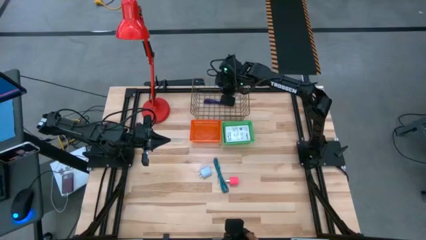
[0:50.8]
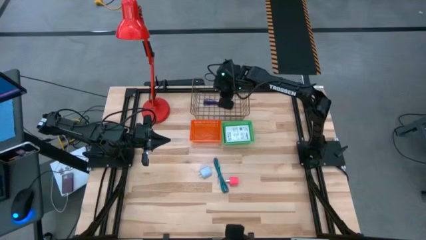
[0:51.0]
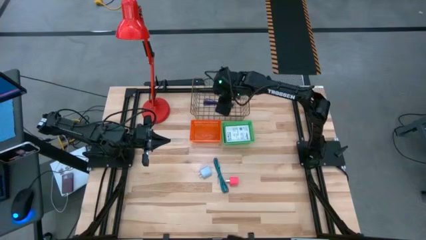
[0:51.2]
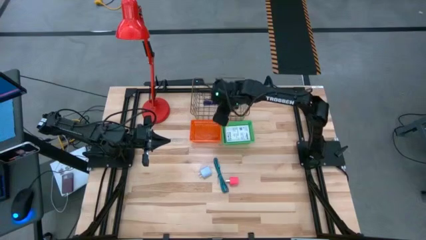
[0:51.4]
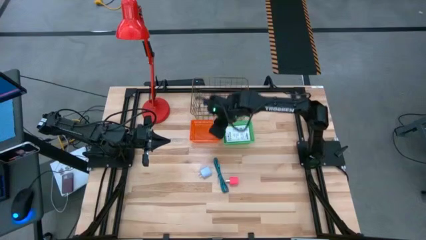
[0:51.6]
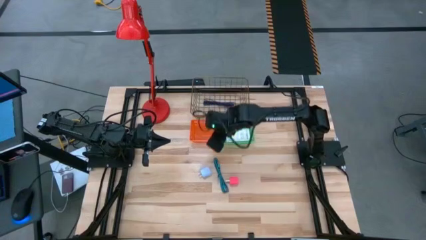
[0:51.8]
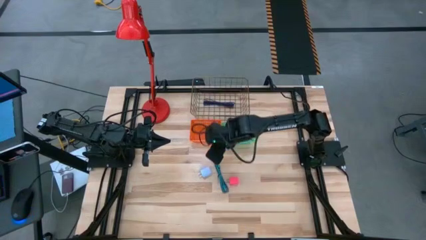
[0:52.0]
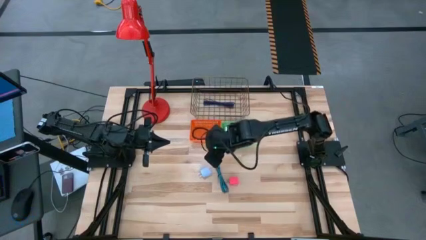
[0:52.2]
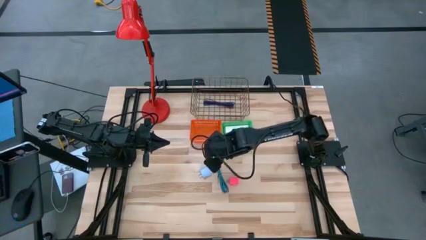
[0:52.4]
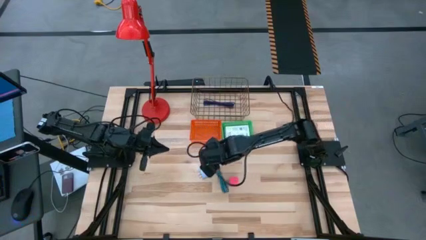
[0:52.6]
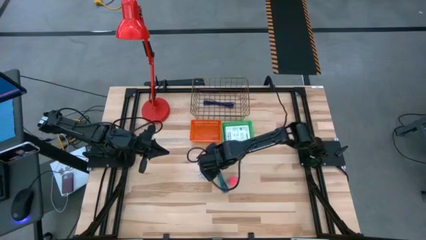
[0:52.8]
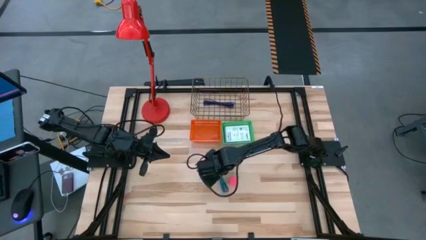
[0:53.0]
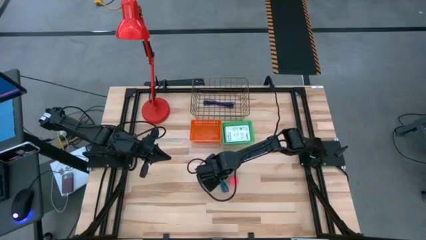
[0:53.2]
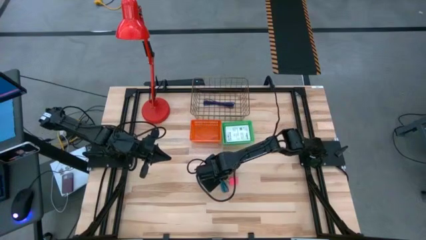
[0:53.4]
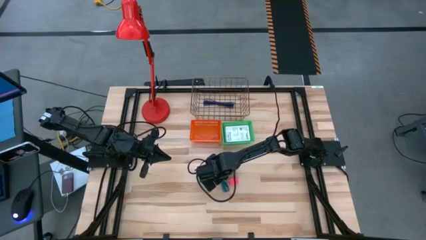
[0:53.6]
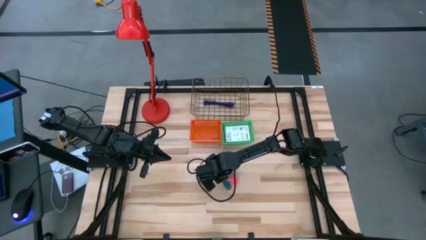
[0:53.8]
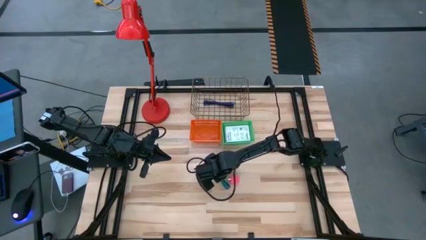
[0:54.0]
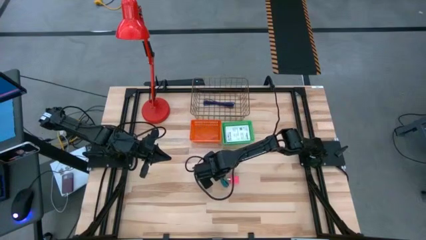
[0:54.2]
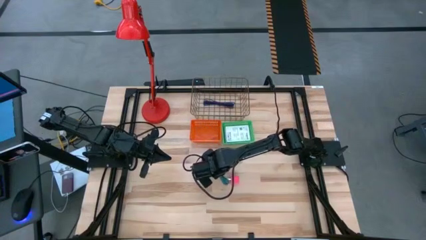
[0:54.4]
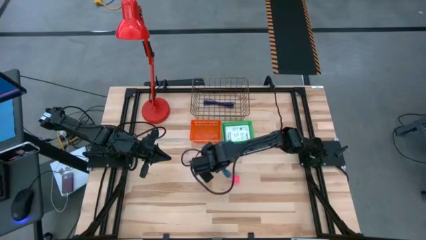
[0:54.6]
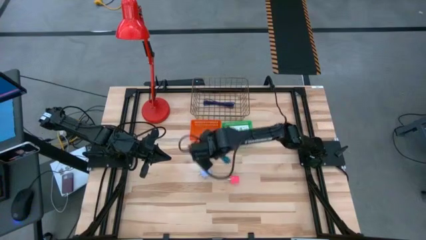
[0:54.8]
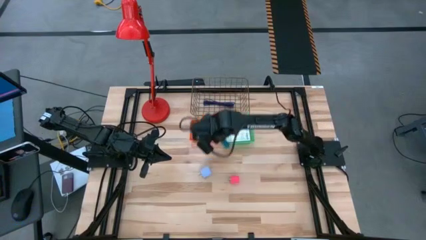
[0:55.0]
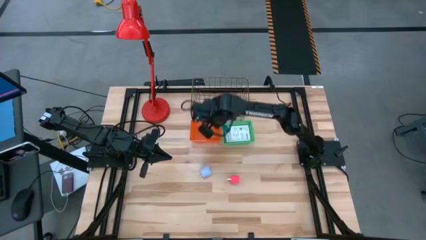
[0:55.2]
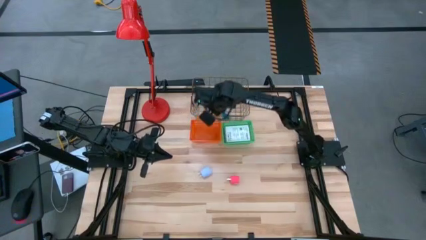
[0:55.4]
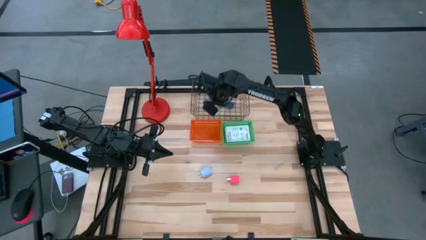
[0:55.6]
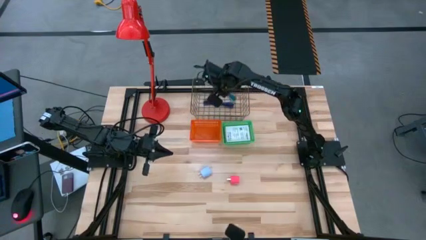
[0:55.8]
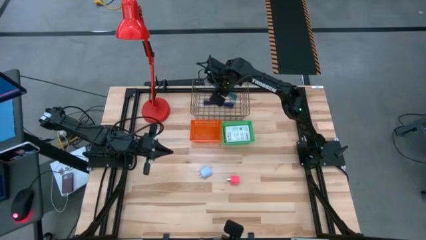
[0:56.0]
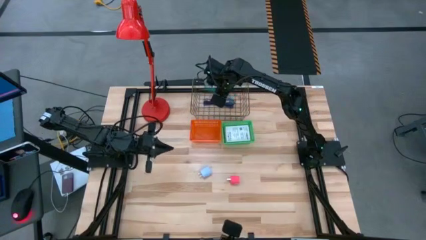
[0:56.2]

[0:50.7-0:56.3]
Task: Pick and place items into bin
Put the blue charger cable into the wire basket

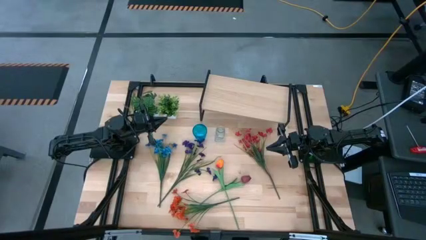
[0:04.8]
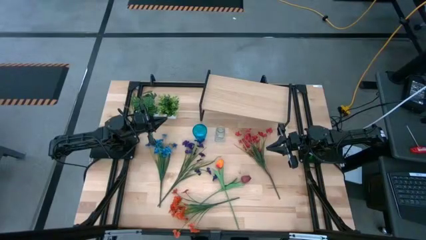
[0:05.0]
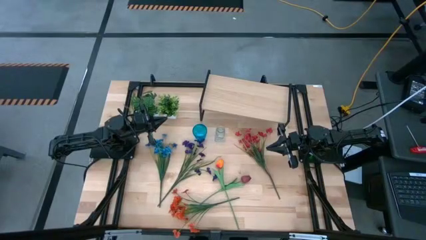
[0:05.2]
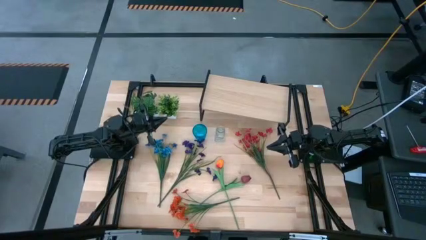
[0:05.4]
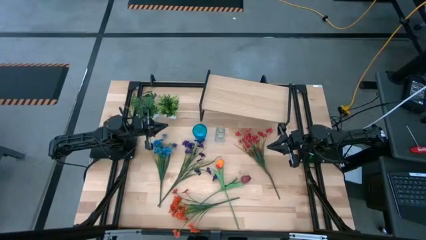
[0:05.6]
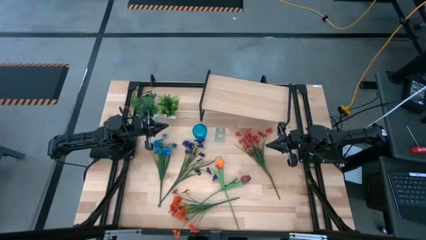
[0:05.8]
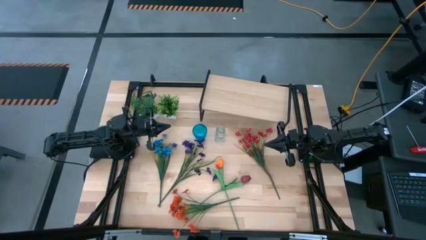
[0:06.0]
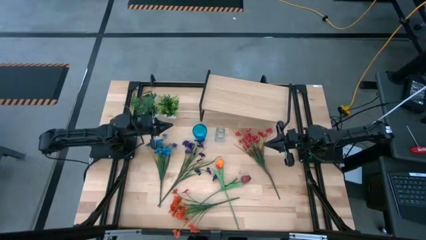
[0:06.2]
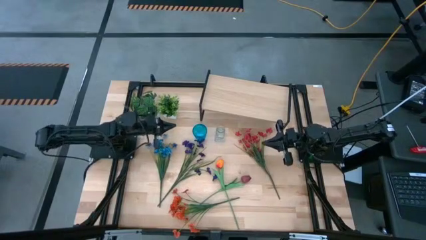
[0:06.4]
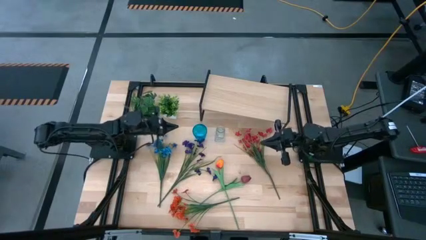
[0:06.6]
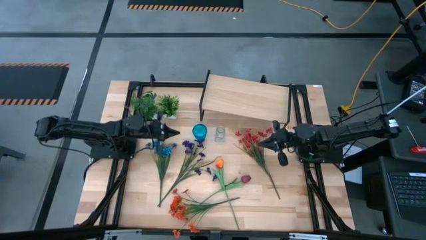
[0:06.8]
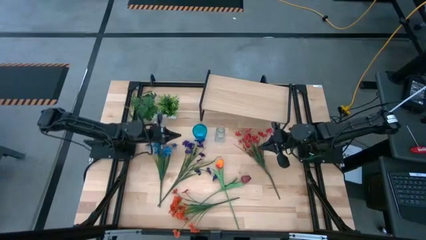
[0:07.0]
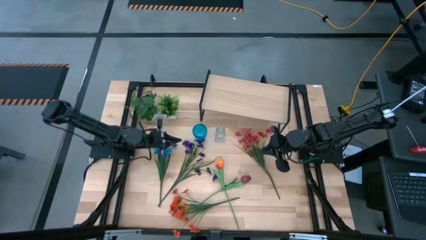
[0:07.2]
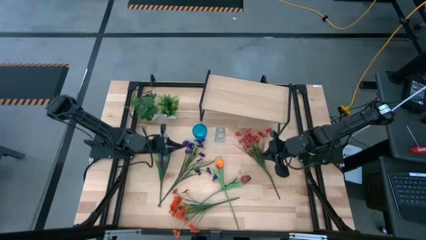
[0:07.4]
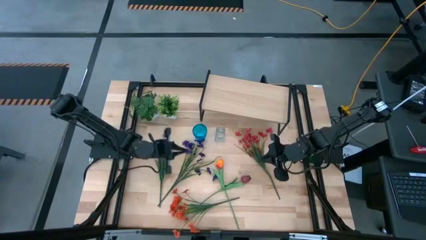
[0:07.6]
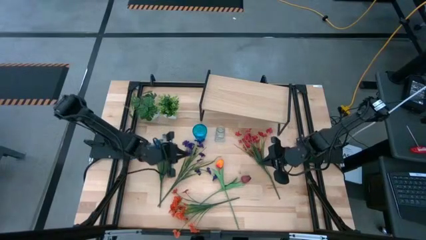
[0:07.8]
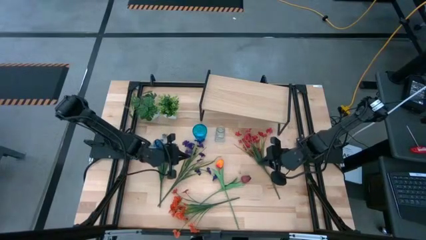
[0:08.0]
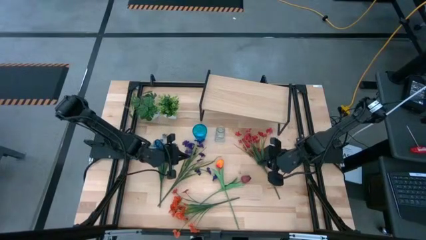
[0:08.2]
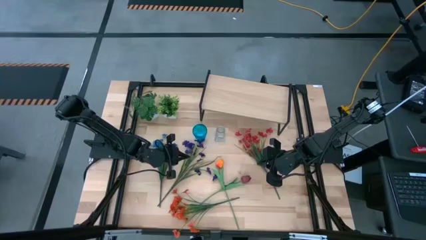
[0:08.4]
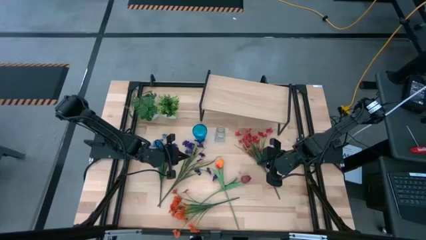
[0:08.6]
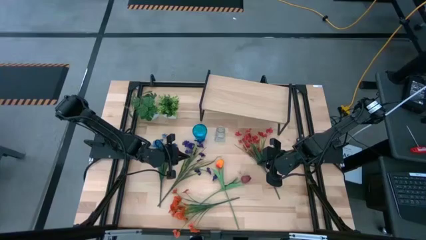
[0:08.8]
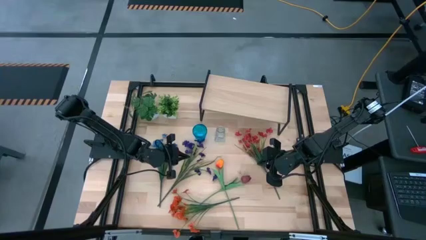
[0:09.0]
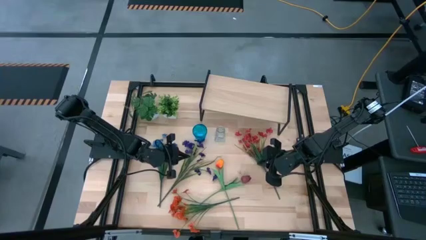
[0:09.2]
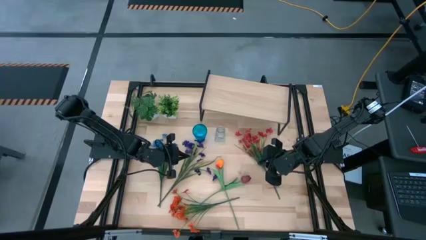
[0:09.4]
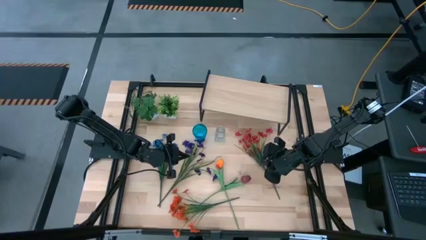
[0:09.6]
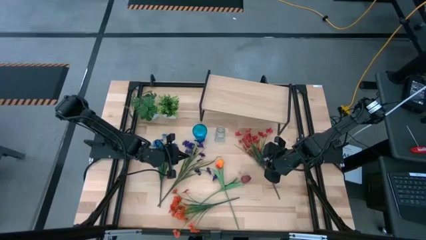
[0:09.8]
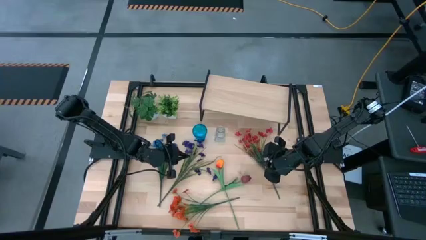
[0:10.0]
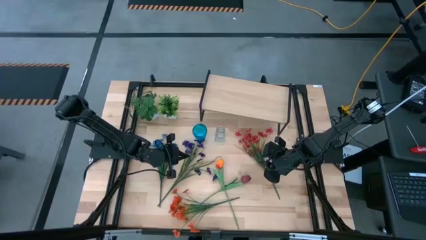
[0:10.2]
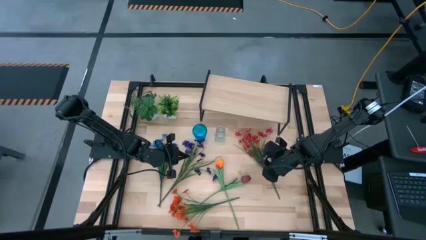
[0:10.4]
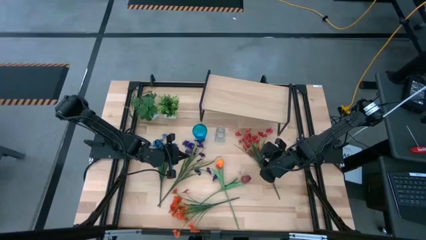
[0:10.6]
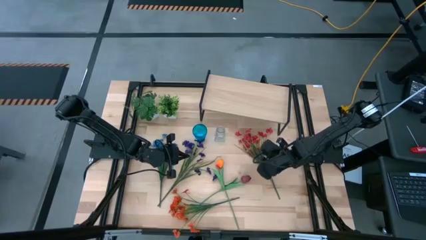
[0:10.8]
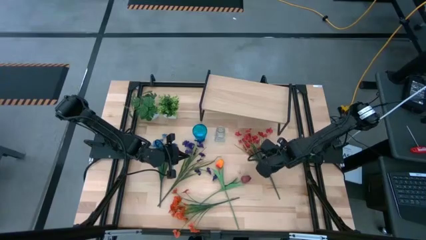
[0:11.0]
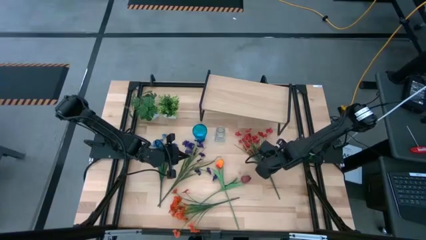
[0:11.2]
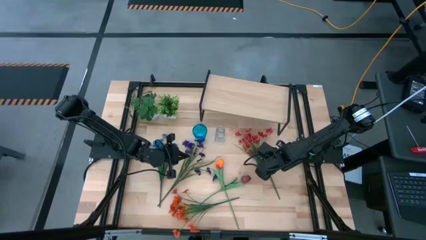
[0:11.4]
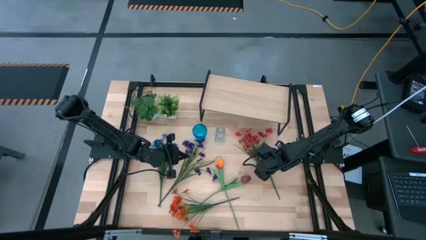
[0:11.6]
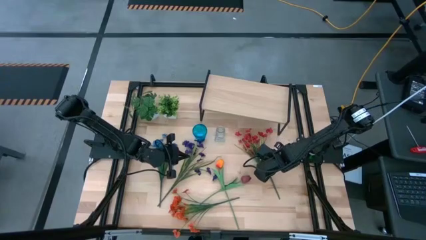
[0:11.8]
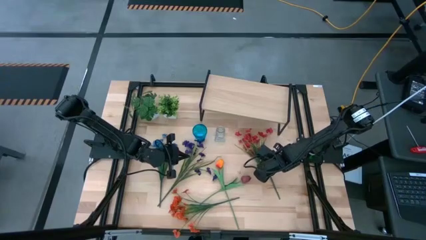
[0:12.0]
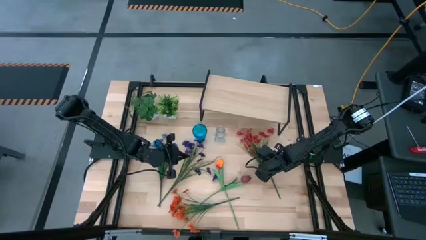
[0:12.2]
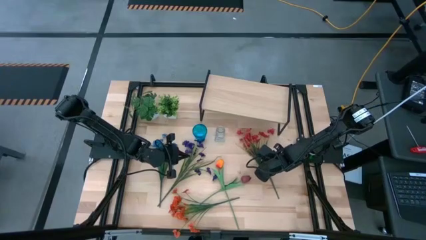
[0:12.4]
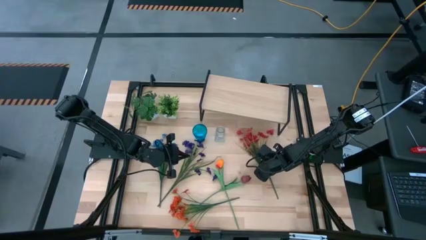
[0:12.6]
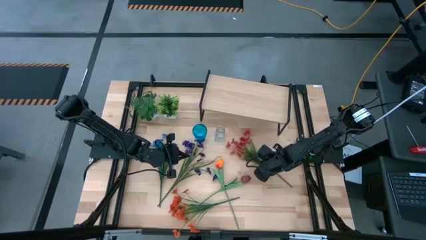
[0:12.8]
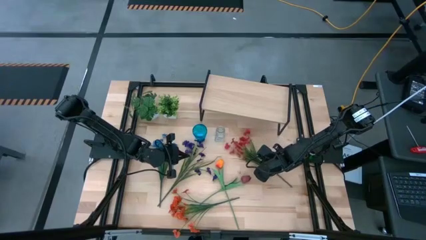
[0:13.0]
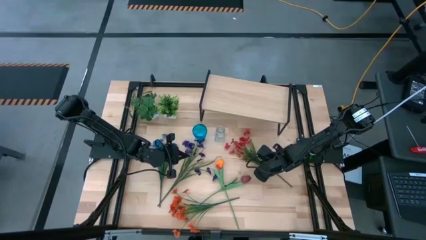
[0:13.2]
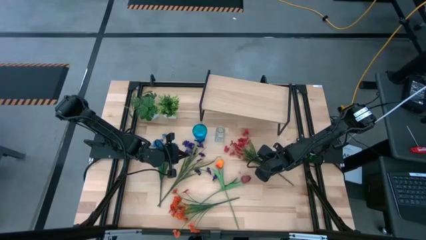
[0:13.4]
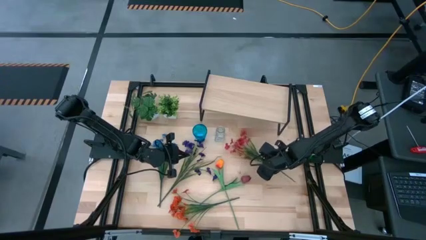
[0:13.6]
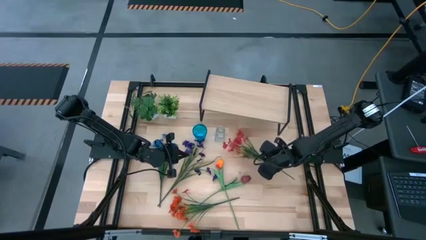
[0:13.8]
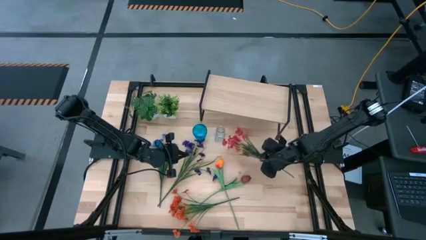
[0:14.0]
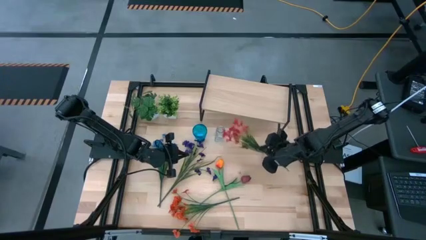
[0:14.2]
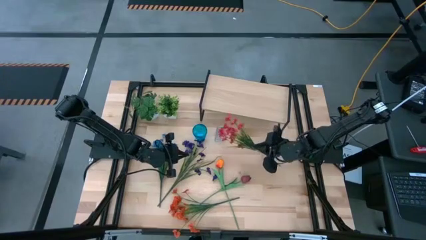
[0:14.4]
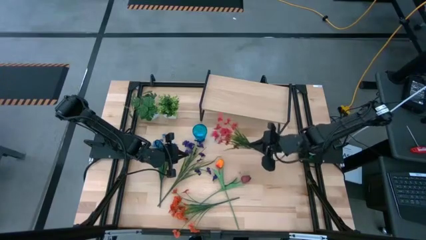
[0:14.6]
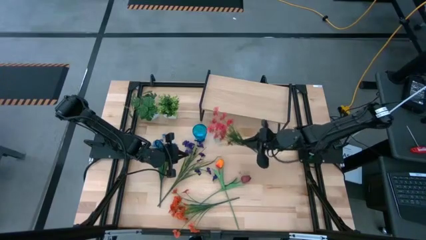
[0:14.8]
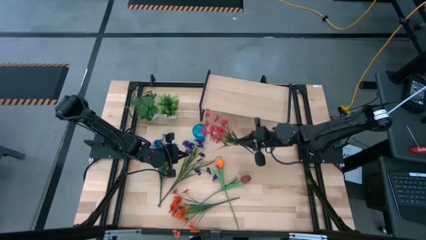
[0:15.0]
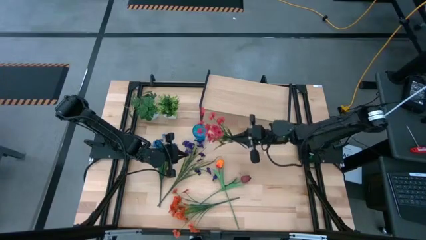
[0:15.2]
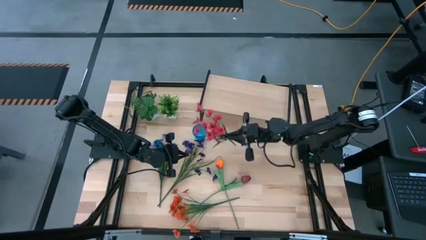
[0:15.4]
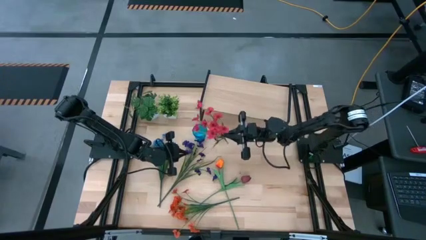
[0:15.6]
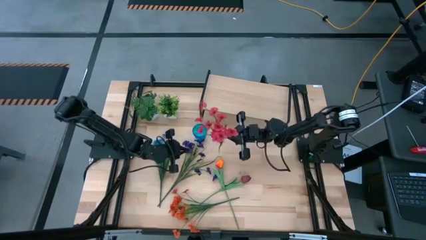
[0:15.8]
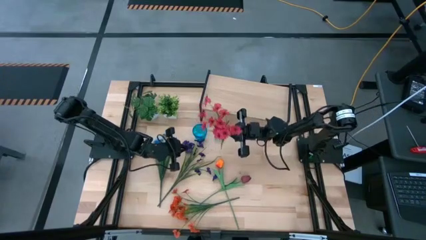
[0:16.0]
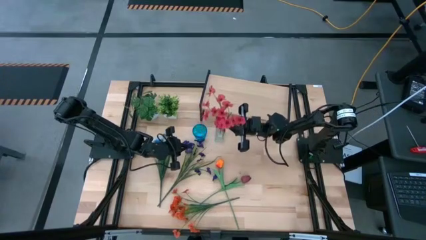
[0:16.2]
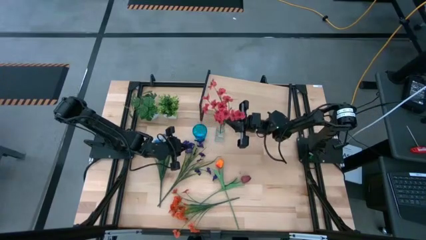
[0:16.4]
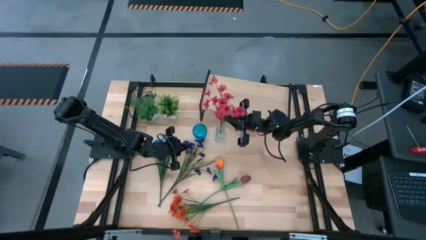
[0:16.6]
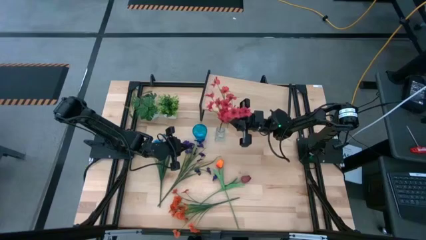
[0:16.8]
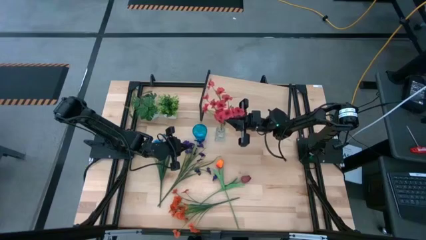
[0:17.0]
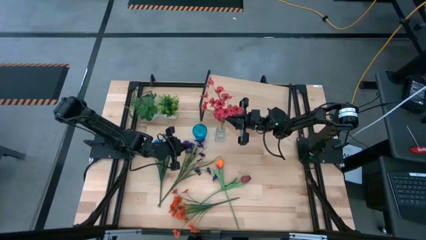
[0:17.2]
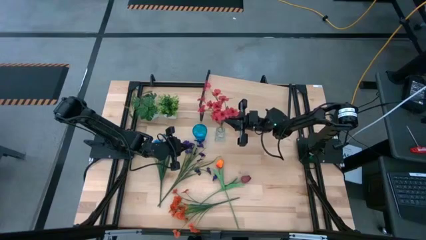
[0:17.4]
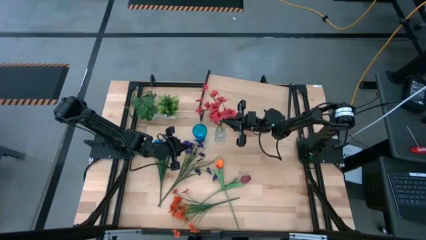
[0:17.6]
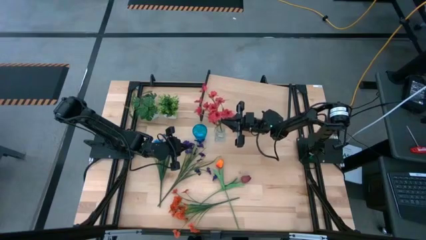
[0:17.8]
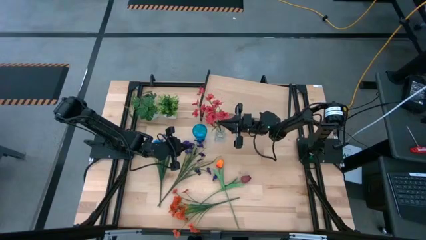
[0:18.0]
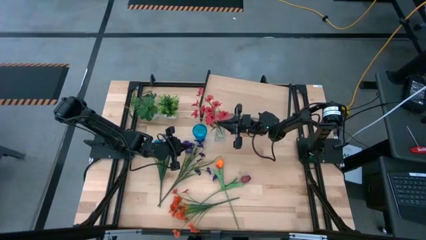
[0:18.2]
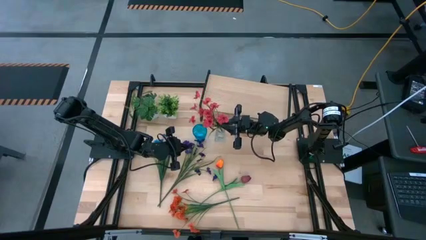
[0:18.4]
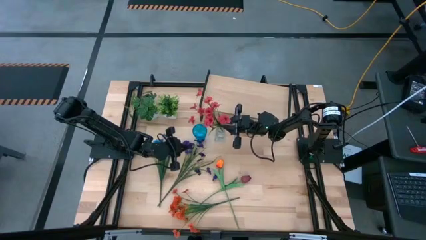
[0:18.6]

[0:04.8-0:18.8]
Task: Pick and place flowers into a vace then onto a shelf
Put the red flowers into the transparent vase
